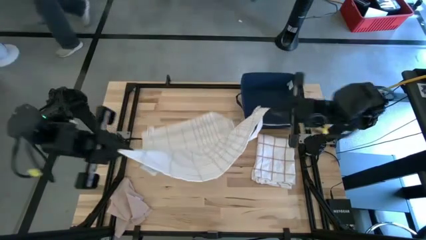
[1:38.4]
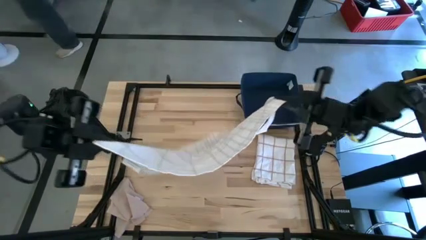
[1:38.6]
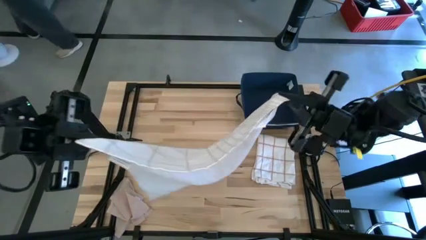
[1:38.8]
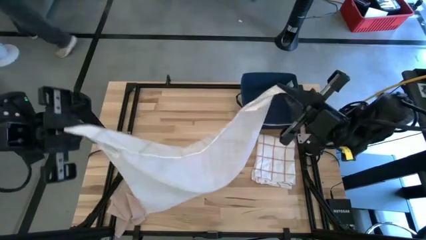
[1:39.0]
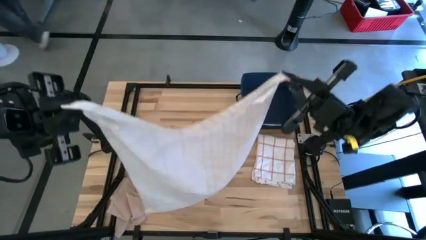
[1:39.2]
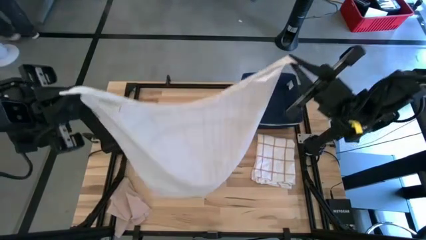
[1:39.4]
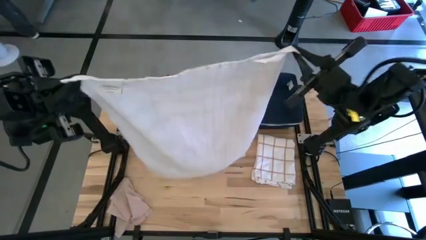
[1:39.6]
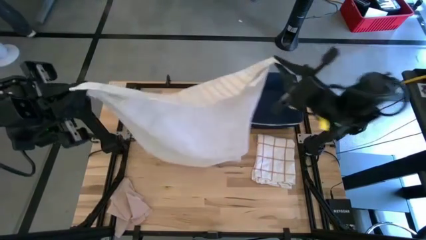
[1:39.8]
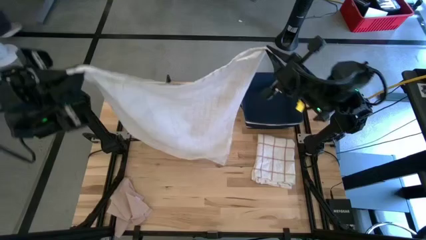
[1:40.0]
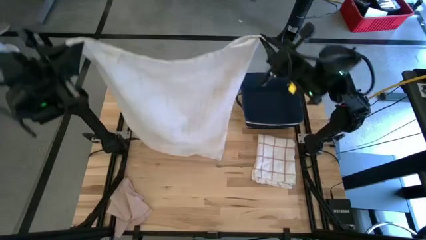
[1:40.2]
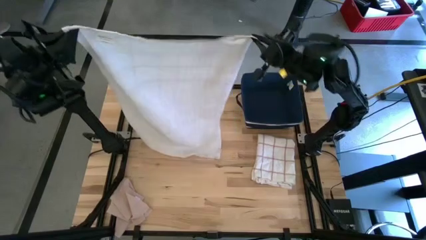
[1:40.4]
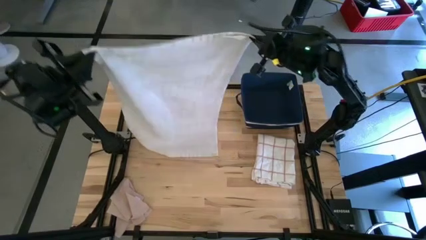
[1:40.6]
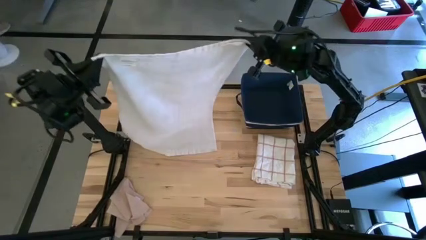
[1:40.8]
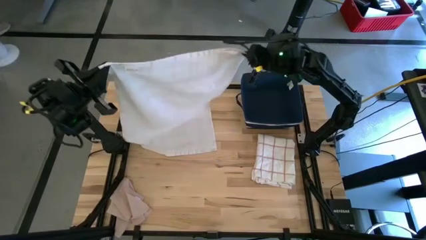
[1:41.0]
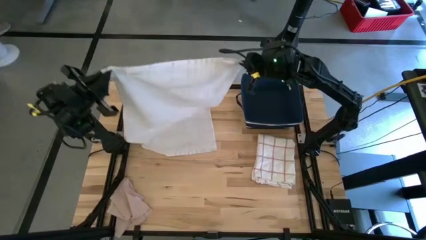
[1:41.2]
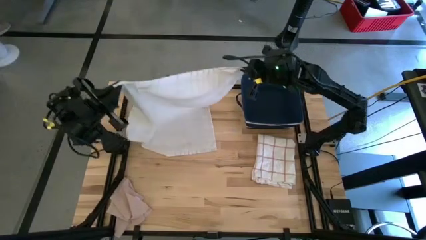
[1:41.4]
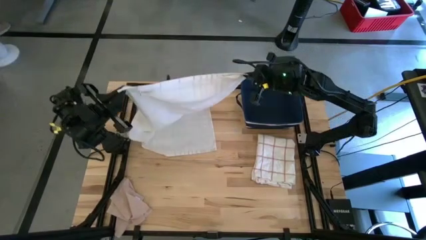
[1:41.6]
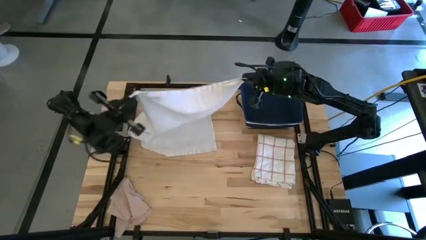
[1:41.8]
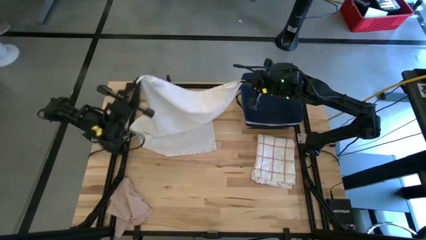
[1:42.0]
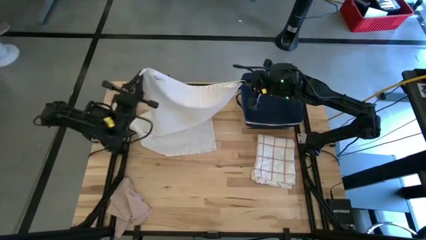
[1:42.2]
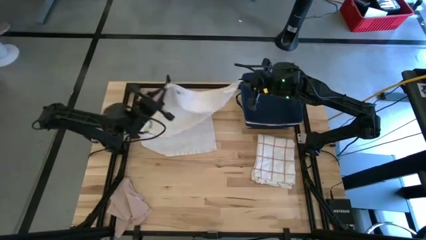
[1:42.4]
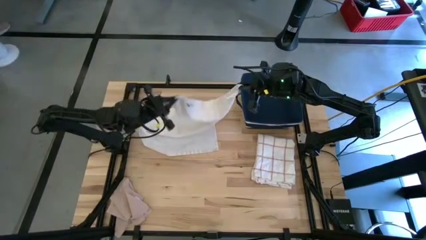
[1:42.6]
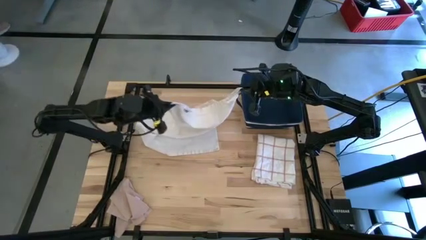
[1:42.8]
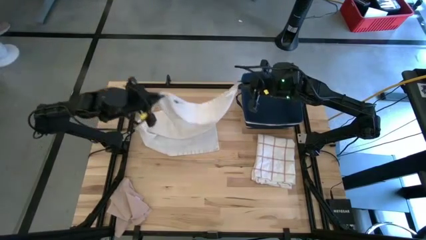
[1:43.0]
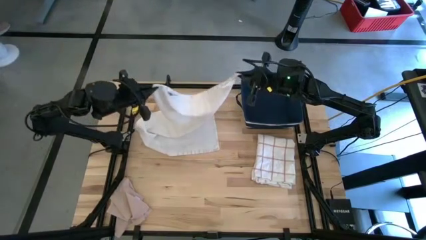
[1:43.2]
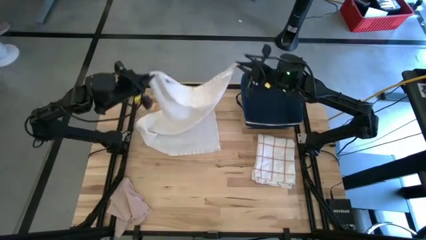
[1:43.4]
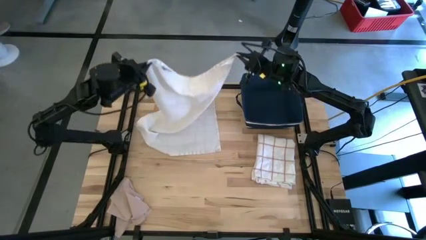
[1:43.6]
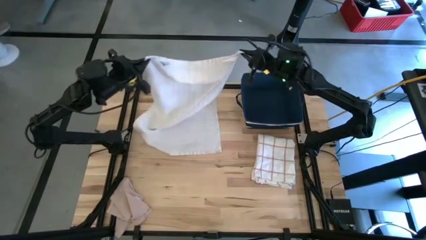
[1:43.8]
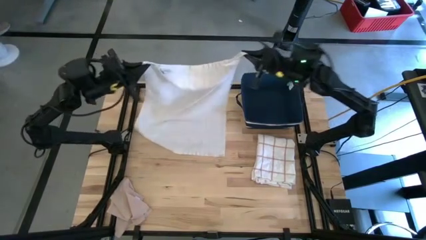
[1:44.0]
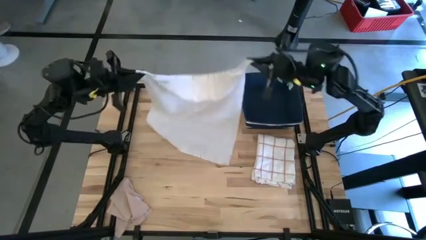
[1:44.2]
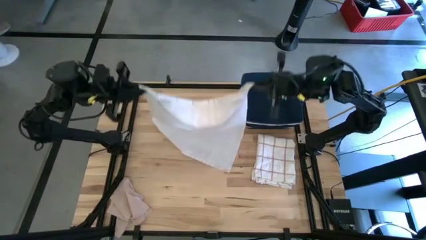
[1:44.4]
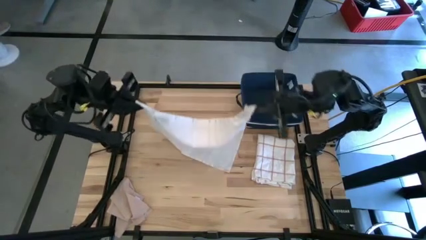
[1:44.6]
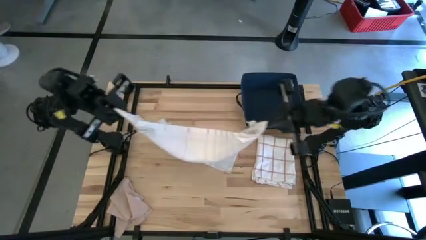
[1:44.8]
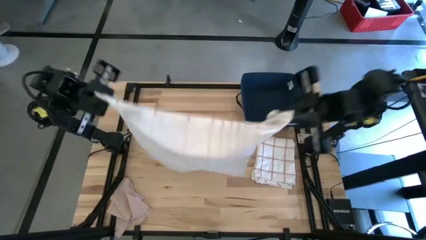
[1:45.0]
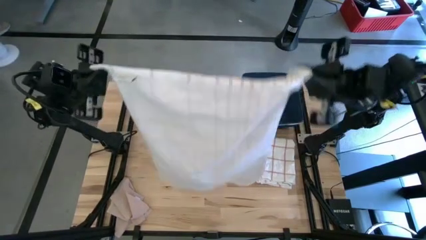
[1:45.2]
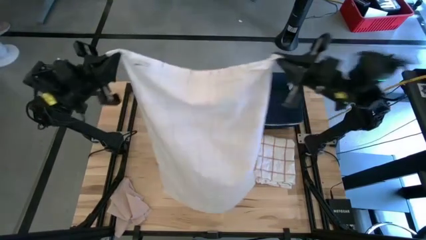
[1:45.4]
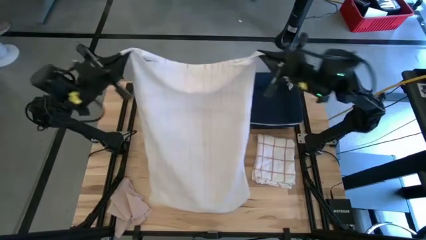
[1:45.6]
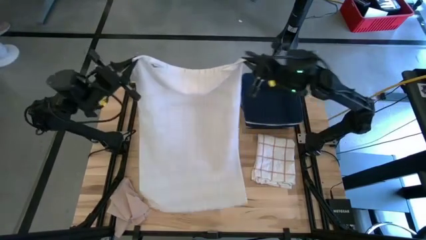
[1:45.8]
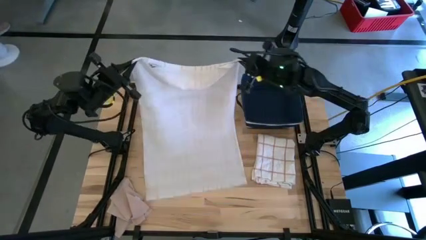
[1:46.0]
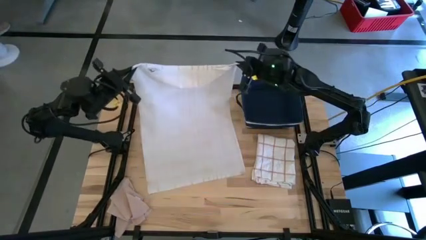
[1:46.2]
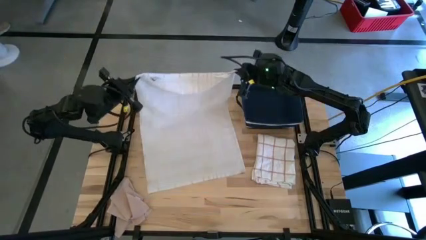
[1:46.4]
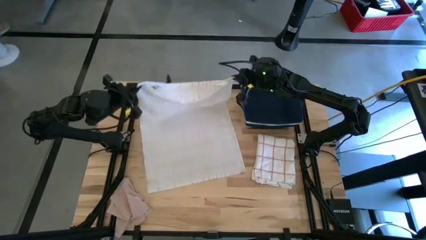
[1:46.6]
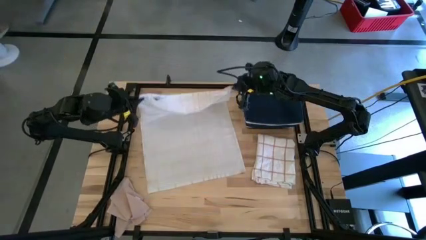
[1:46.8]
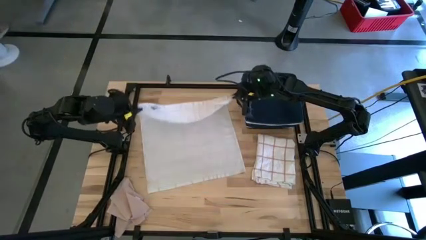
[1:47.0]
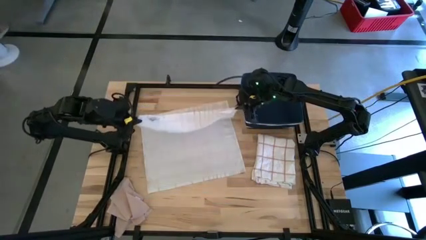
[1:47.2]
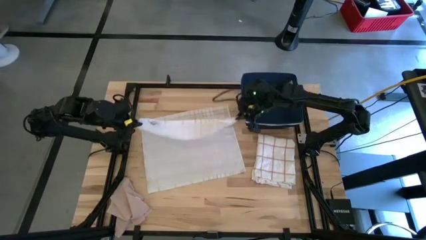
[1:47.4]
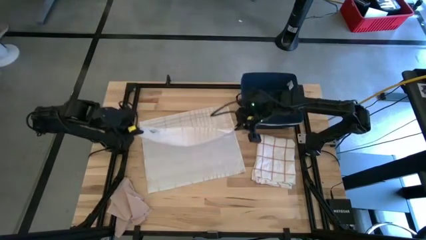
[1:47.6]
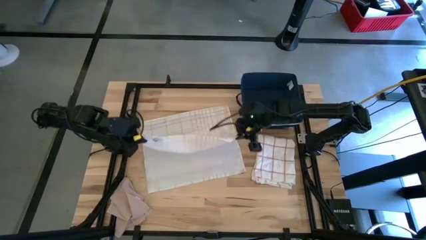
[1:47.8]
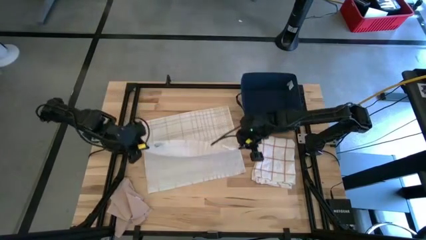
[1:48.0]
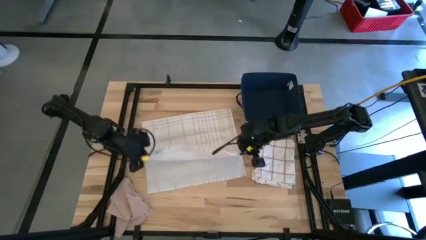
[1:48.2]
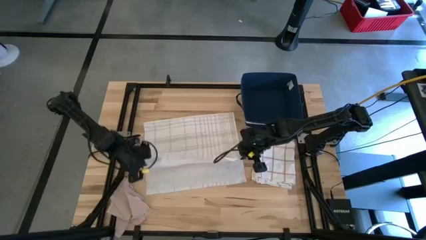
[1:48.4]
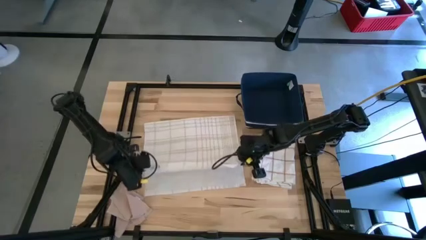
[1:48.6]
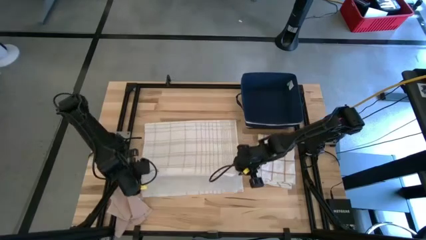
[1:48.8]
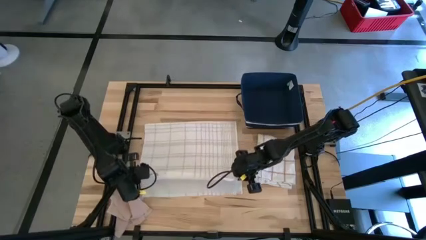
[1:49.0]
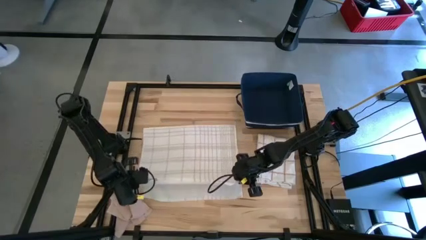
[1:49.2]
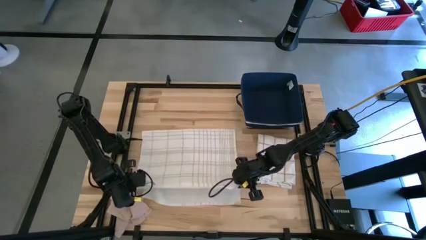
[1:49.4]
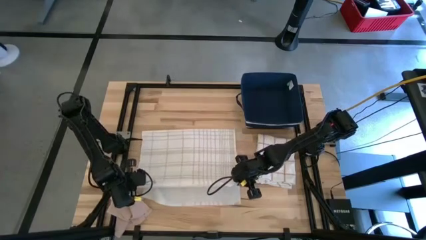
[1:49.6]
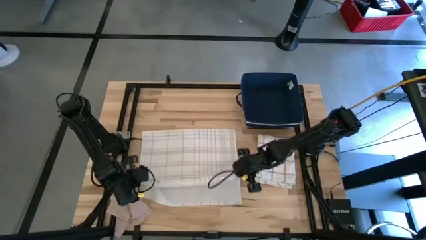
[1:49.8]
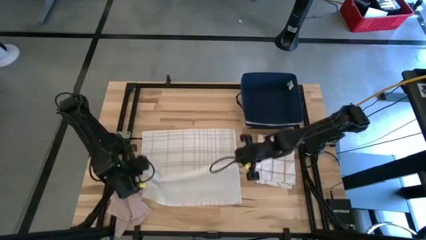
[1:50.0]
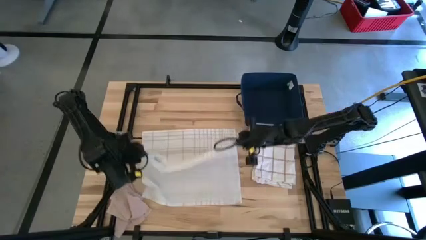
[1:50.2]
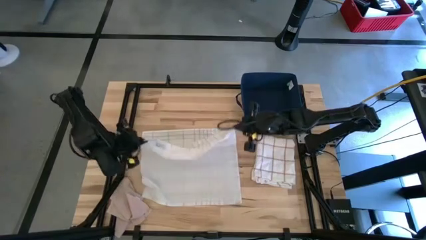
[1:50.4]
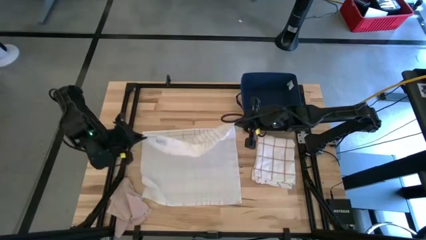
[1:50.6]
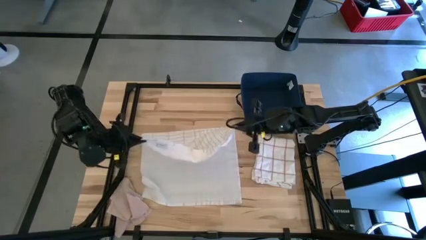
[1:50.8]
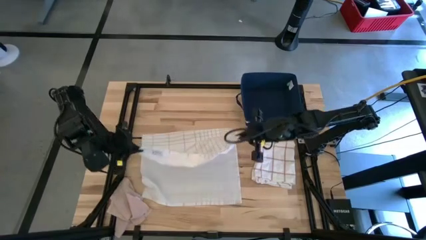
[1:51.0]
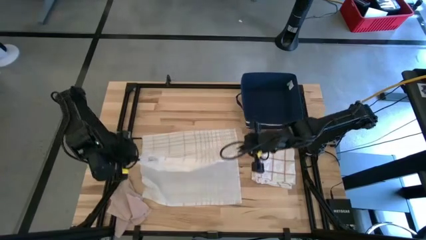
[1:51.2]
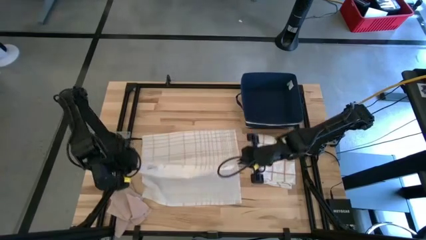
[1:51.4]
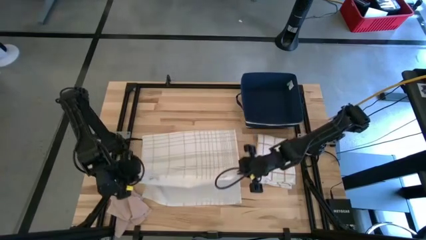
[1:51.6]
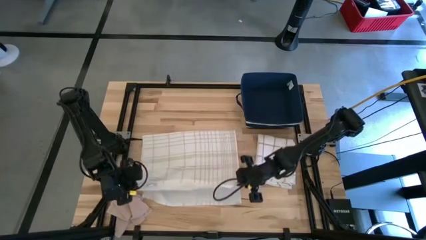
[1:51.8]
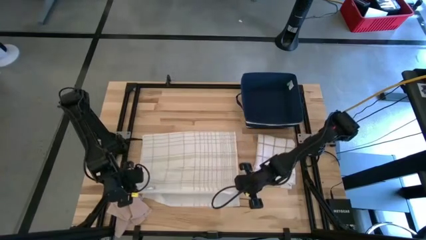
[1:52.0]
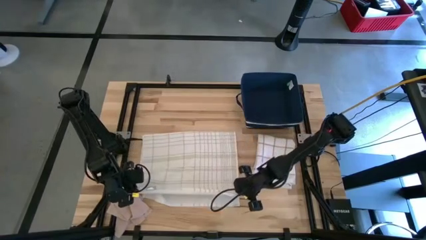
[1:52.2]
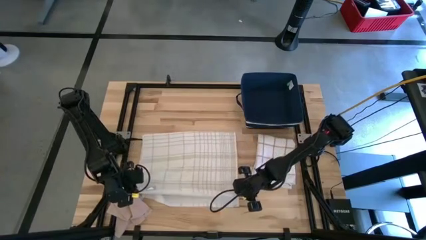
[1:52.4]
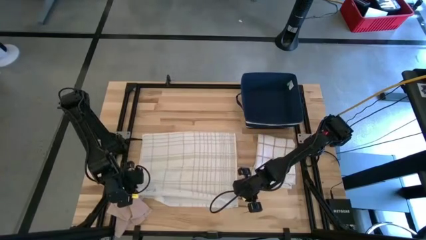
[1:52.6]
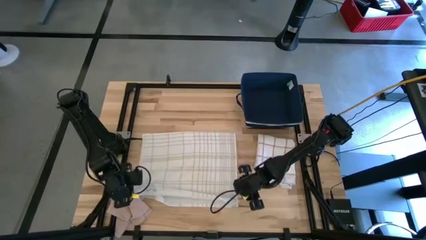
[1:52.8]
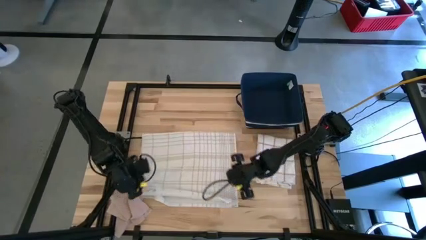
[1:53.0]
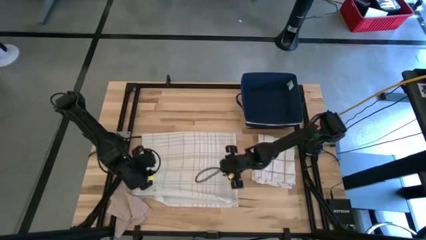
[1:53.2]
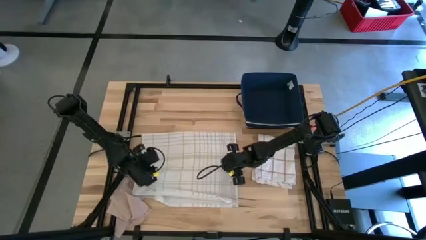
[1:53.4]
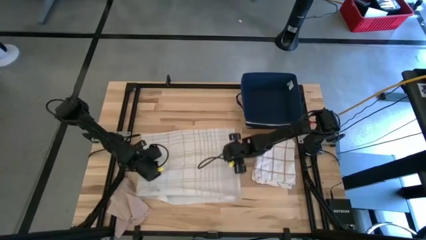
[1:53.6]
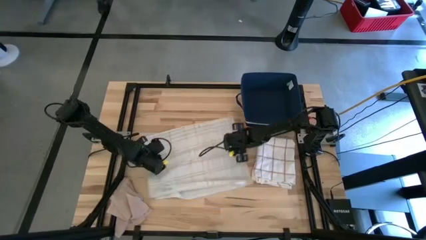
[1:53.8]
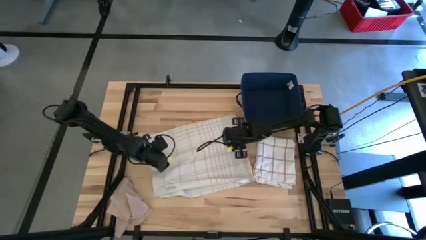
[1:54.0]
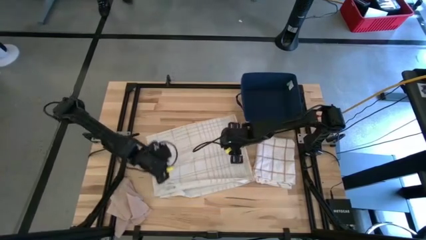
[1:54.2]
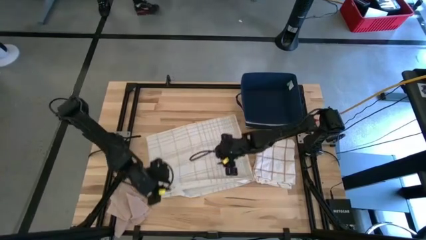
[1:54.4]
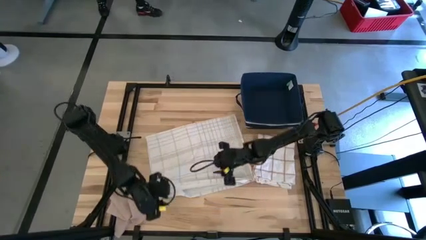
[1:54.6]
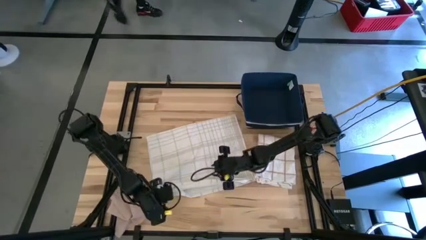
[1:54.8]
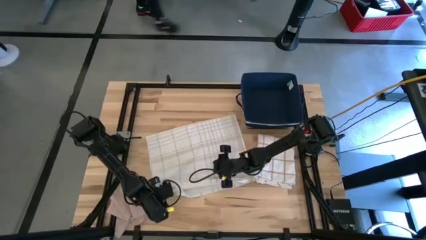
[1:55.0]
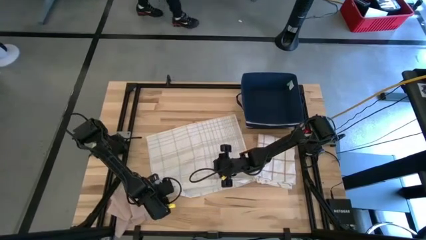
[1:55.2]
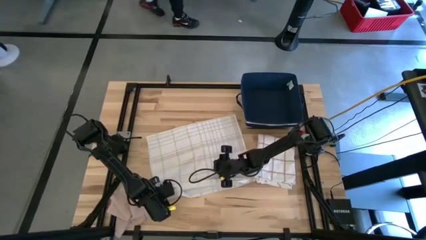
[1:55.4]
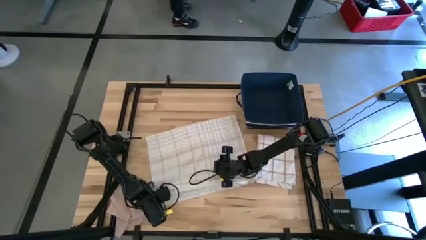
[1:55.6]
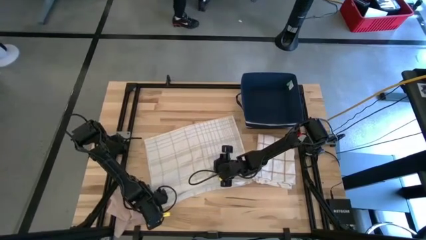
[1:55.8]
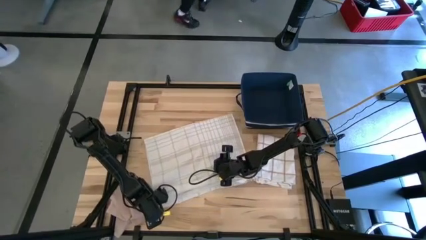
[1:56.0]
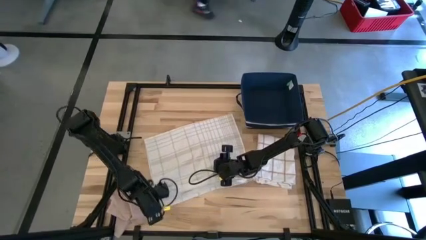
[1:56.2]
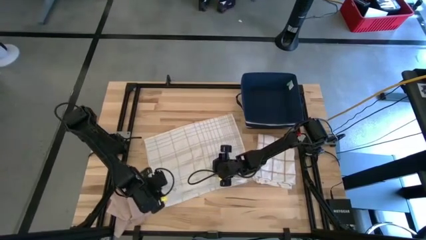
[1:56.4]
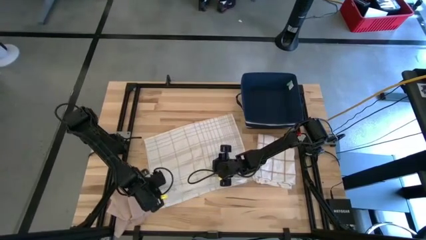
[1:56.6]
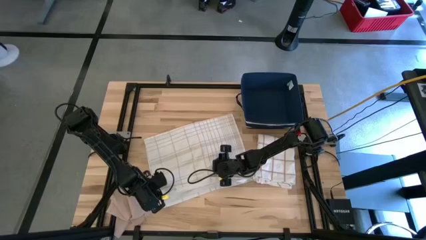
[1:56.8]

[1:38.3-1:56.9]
Task: Fold towel
Fold the white plaid towel
